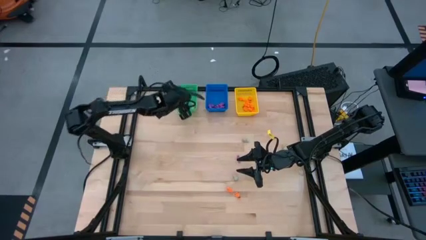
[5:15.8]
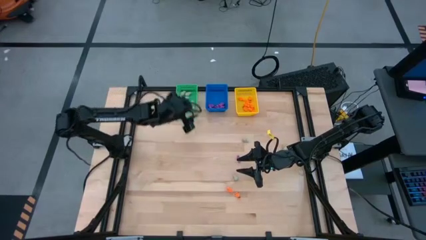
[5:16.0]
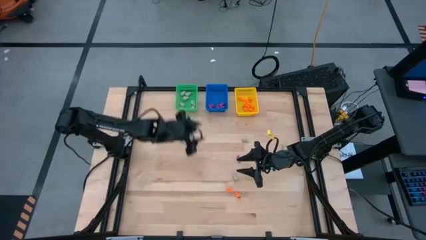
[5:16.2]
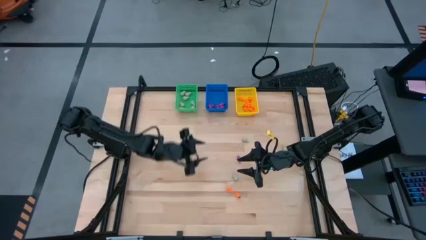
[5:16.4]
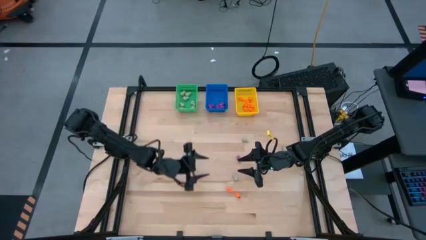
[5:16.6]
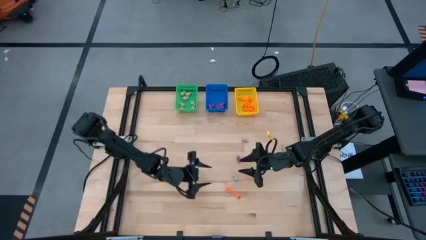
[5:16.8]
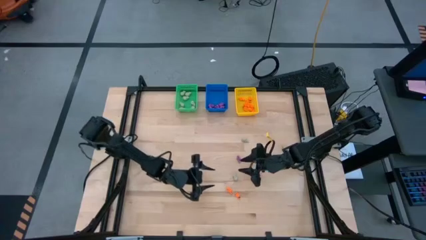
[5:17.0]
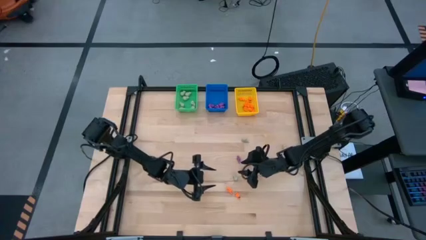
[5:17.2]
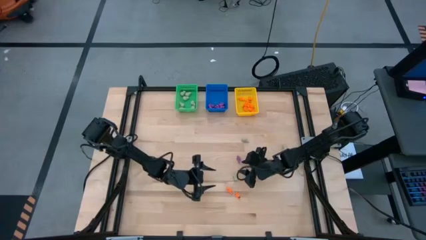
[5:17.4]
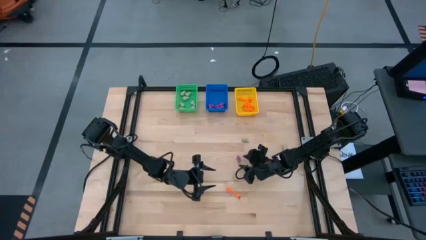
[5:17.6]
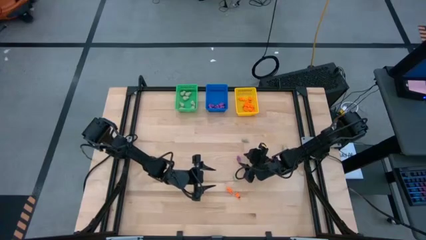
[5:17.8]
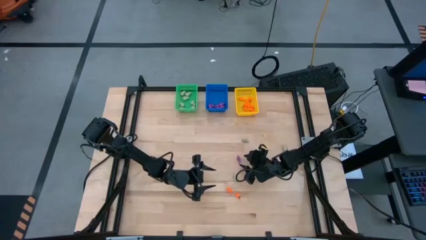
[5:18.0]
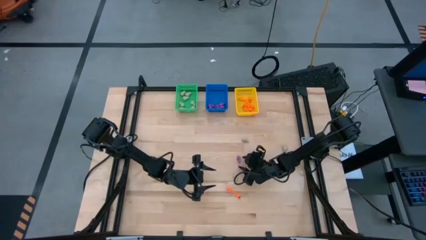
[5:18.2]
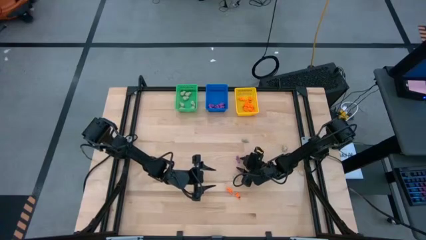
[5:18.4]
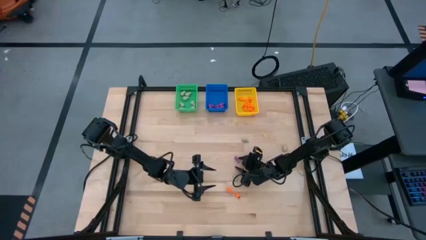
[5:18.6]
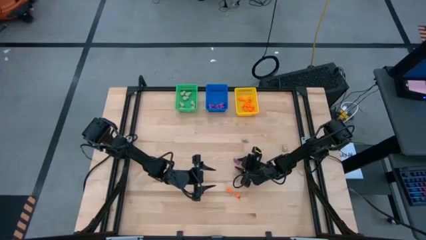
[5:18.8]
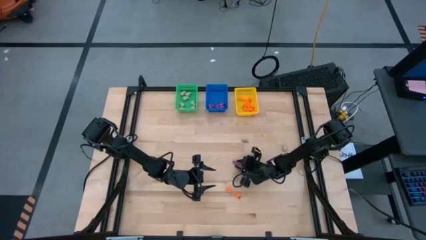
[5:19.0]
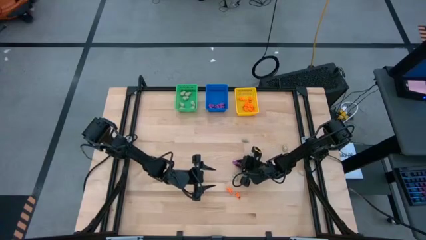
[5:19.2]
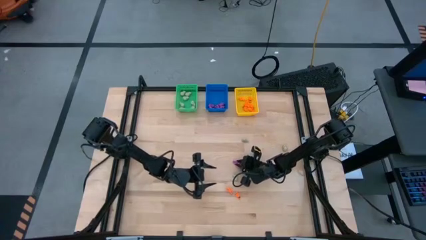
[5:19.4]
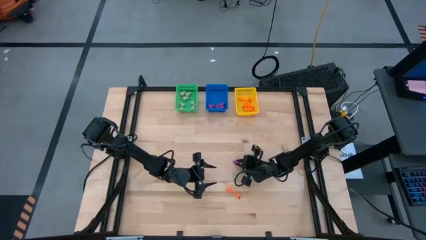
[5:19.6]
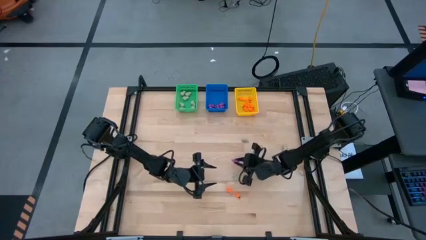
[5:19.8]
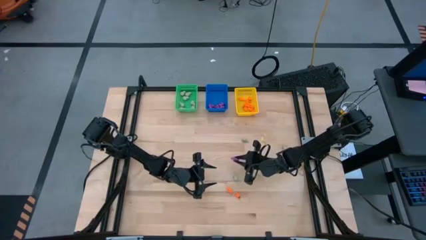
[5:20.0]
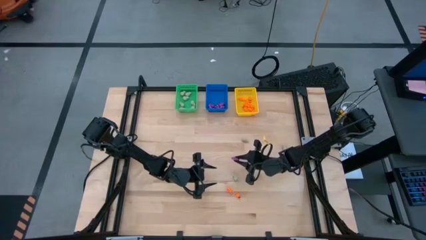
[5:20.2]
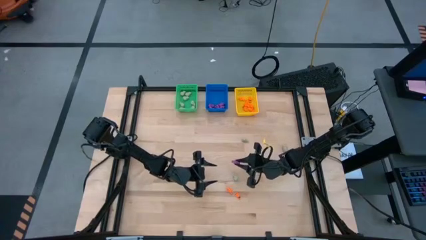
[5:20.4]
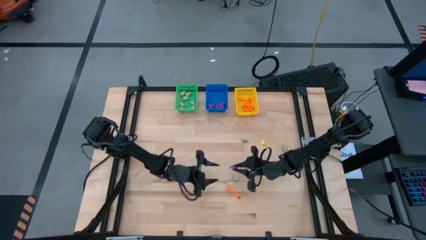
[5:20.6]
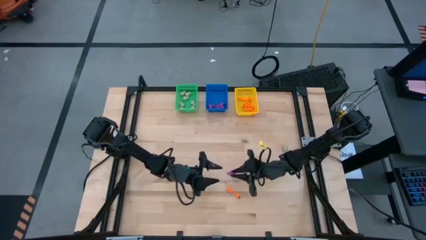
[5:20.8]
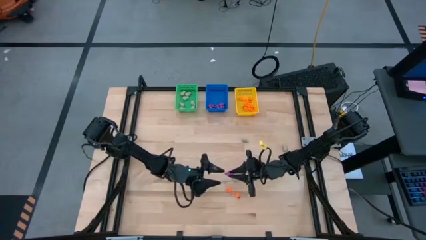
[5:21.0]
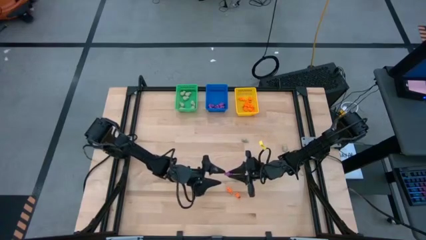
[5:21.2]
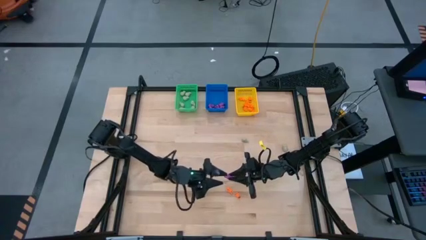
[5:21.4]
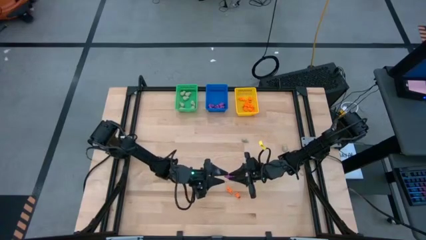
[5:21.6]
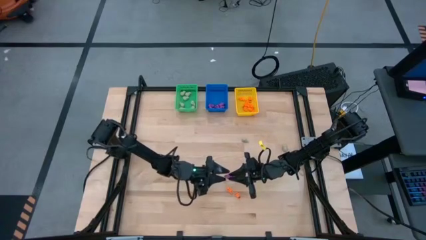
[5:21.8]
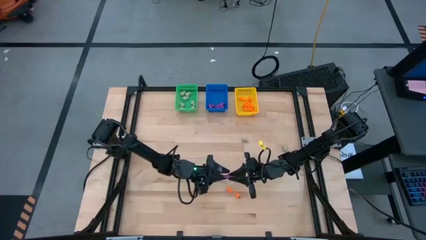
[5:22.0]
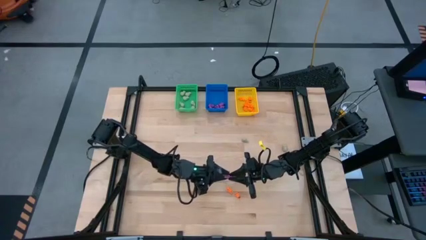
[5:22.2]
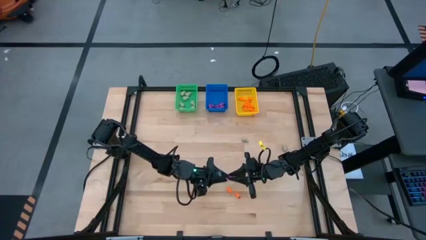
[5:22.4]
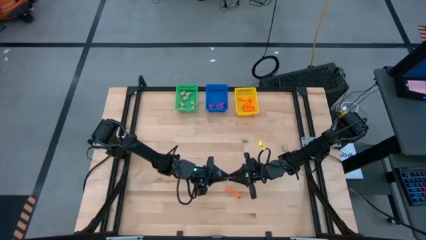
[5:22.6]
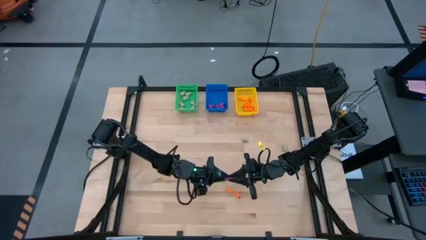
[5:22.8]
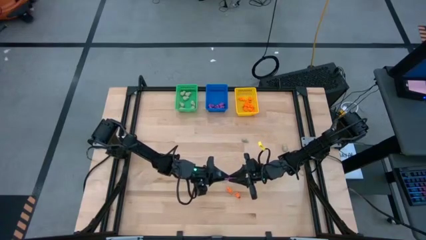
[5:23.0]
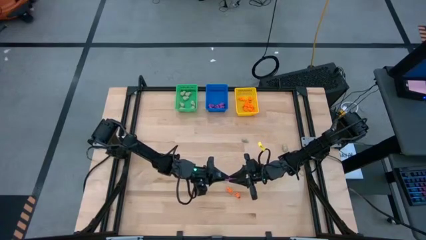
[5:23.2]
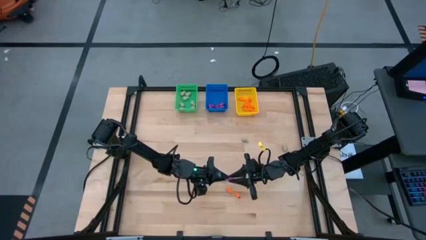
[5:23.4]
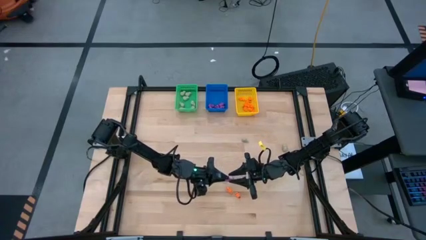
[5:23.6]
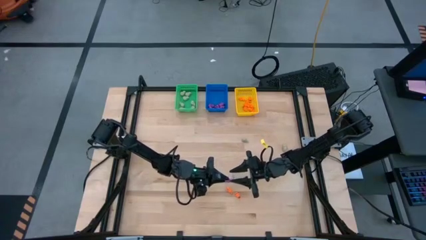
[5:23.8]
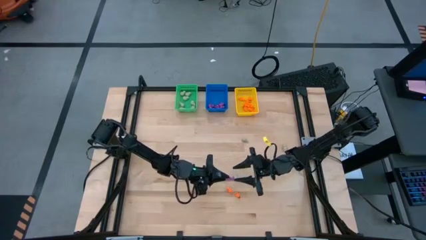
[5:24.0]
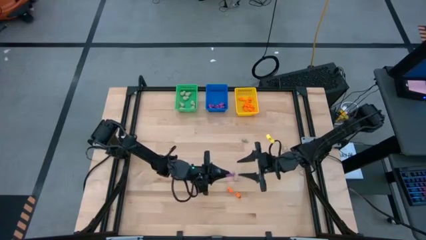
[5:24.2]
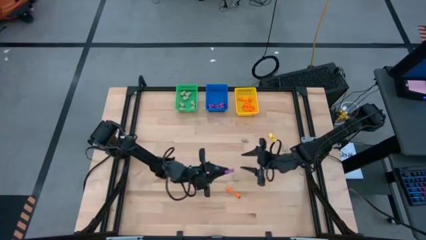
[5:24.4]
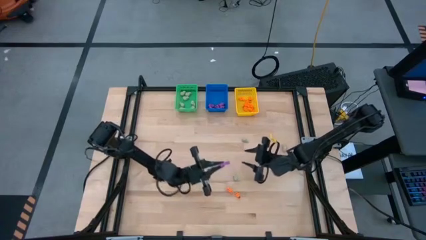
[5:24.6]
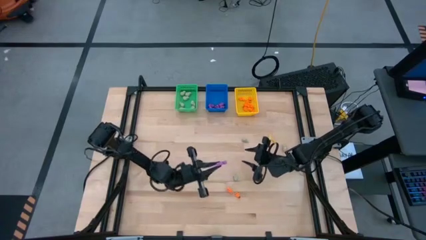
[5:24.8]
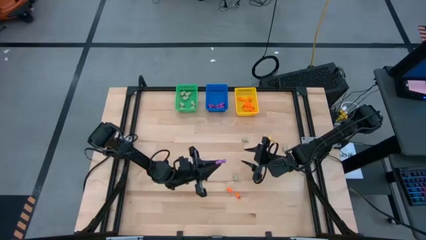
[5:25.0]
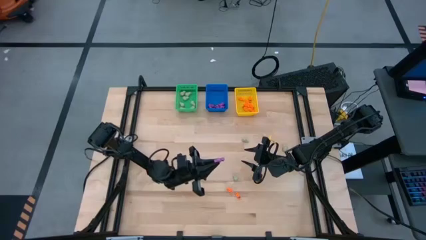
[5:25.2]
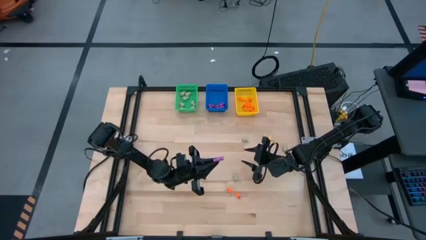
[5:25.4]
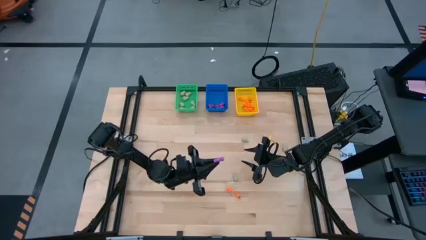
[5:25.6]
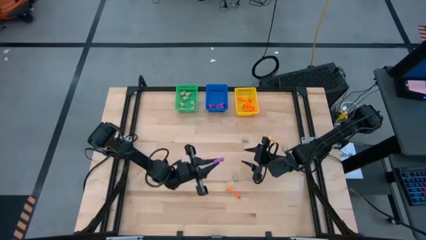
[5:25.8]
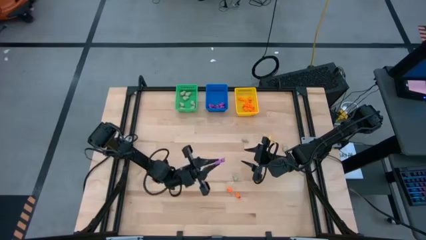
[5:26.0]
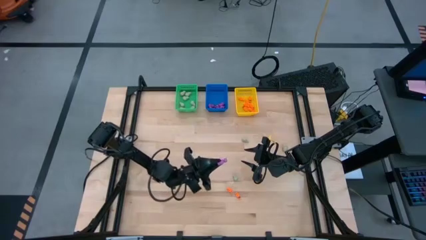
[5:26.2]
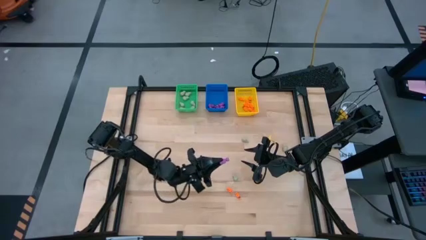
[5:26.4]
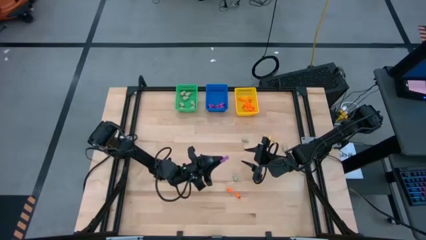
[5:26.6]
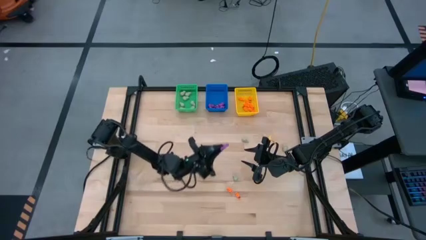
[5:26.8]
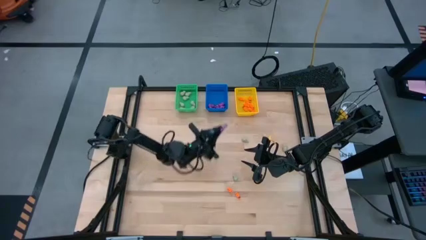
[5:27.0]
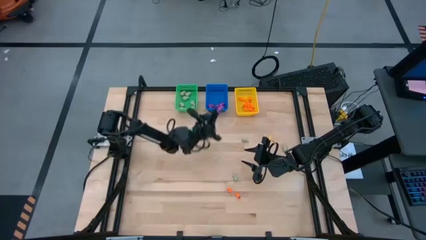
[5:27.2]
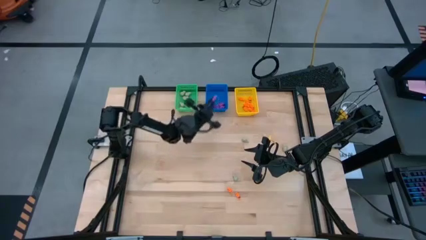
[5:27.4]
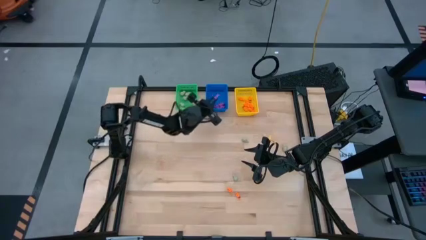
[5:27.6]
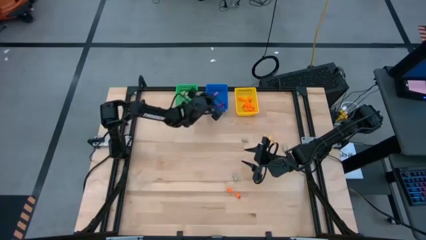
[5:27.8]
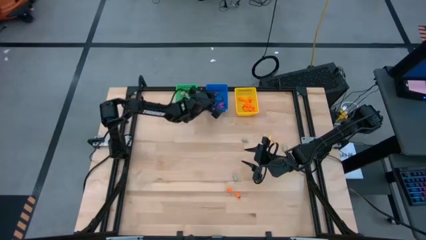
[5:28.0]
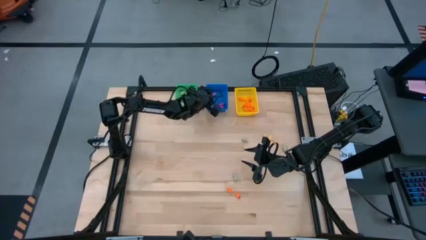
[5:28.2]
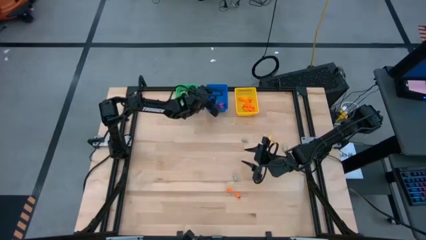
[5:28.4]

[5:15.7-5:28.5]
Task: Sort Halloween decoration
Put the purple skeleton toy into the blue bin

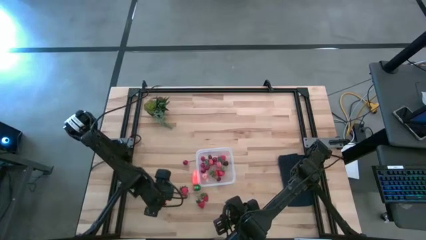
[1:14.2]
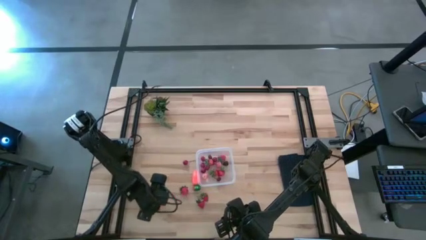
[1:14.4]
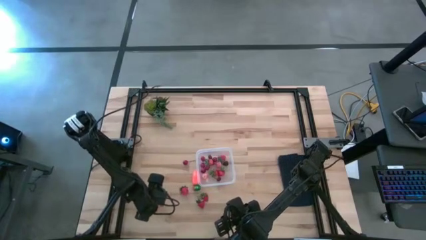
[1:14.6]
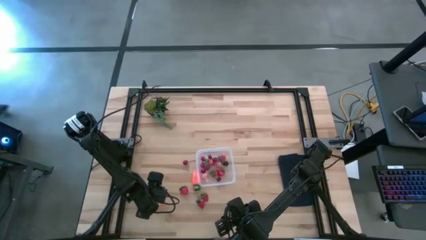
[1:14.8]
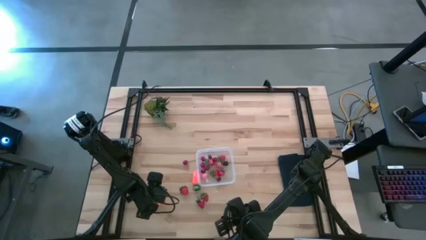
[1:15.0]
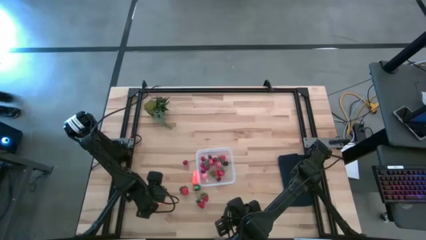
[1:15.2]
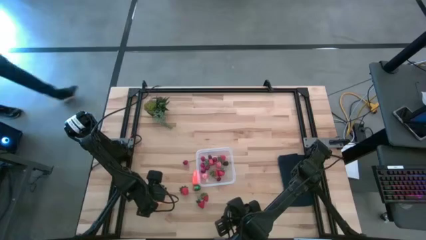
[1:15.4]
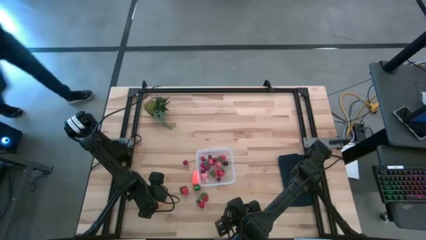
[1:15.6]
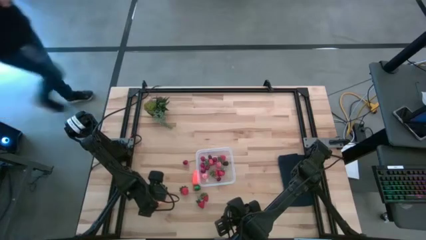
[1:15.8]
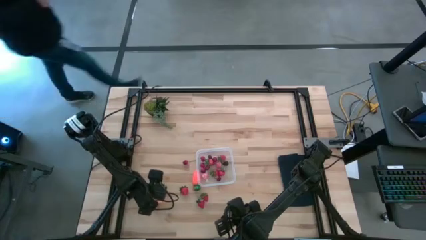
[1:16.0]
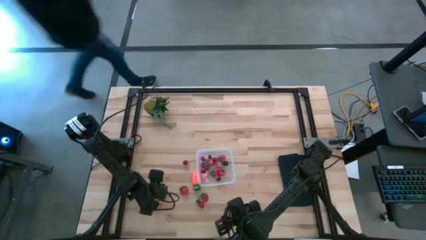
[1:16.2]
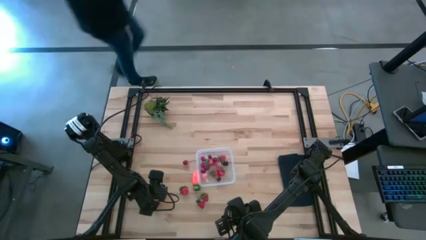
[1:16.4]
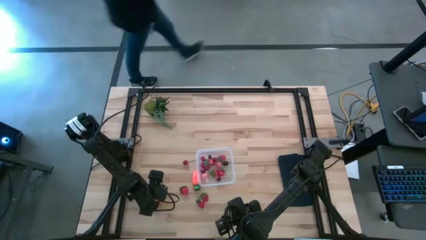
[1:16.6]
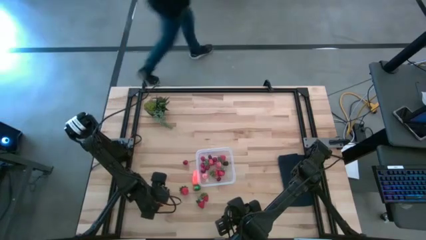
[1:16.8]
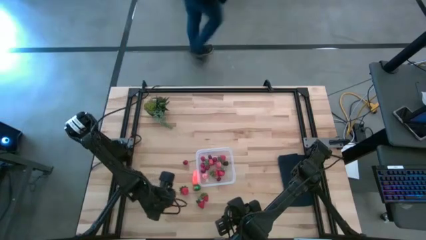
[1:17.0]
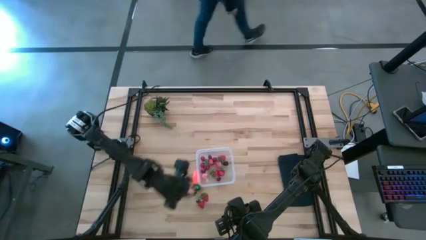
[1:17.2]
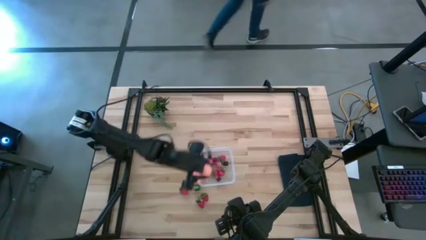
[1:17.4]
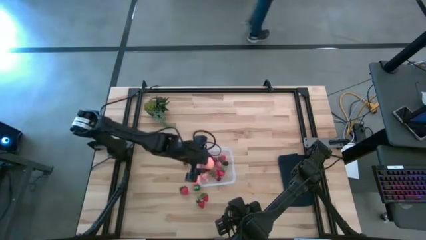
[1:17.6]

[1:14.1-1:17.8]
Task: Pick and placing Produce into tupperware
Put the peach into the transparent container

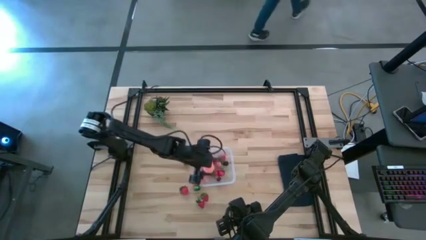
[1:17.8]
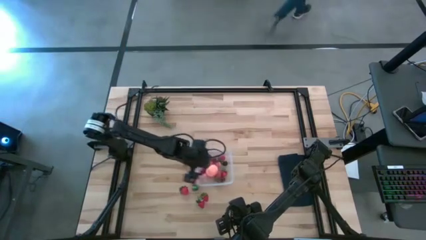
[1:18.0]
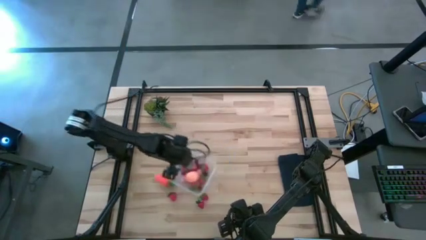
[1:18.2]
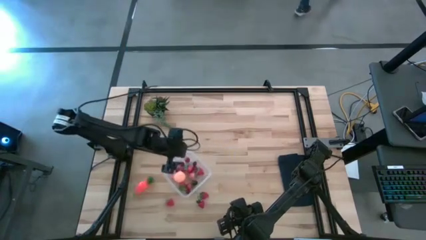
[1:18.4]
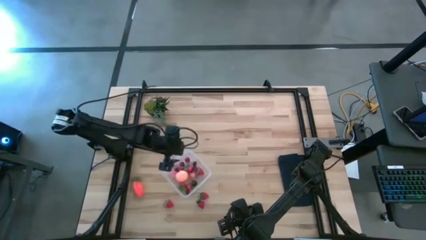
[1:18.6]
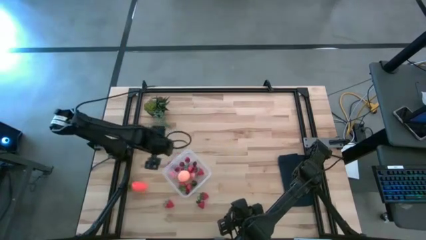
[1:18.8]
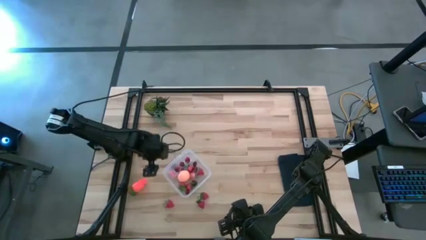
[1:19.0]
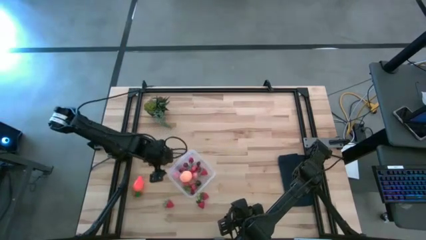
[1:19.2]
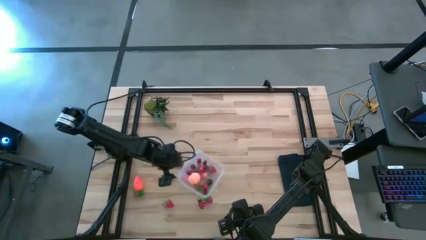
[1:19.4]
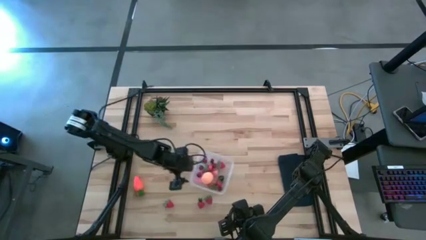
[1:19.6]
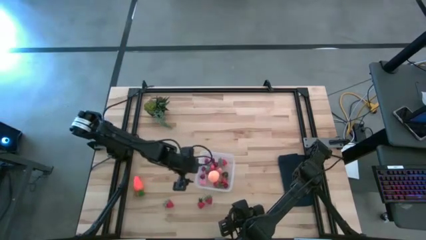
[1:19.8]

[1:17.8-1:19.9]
Adjust the transparent container
